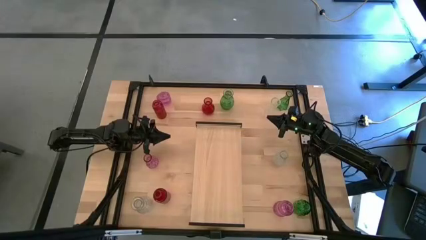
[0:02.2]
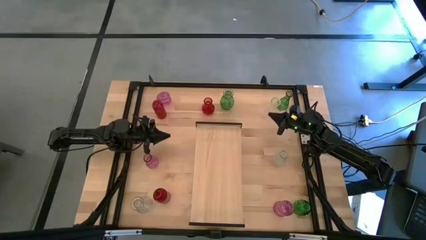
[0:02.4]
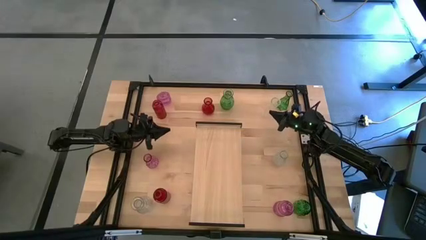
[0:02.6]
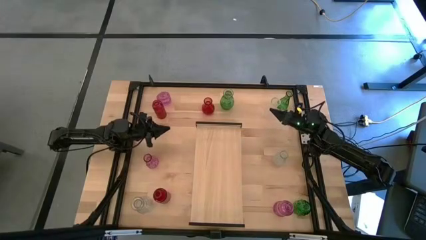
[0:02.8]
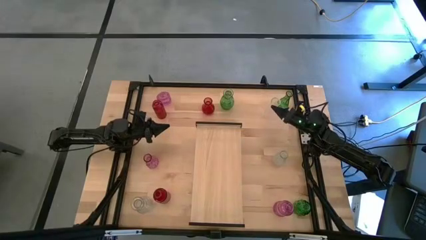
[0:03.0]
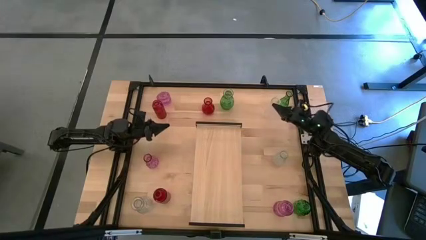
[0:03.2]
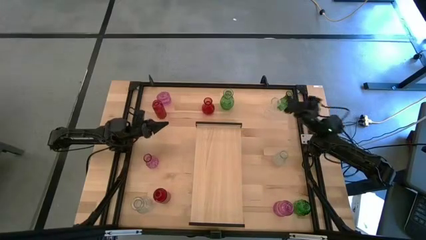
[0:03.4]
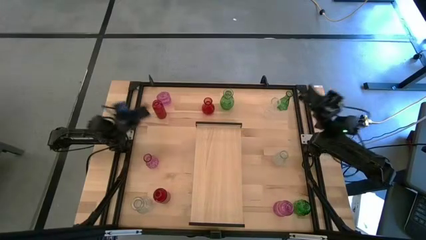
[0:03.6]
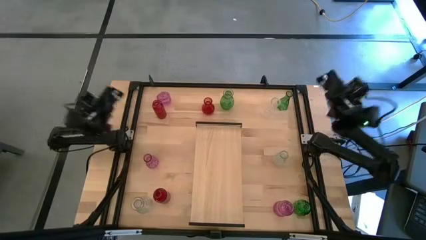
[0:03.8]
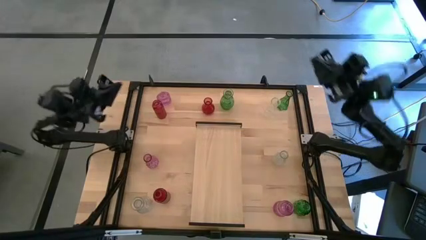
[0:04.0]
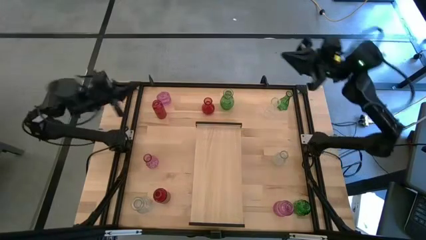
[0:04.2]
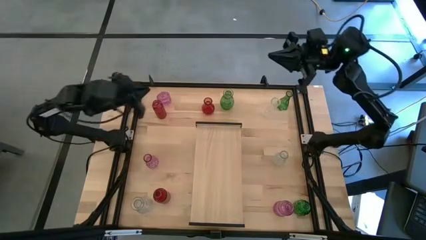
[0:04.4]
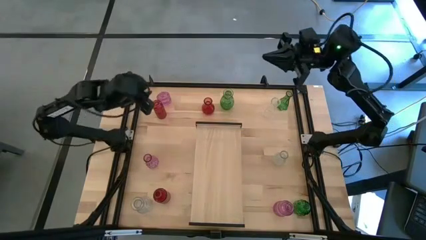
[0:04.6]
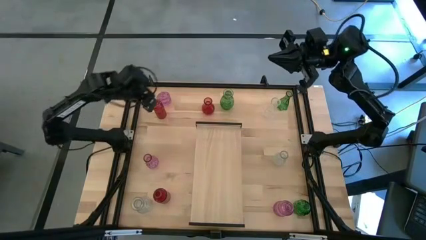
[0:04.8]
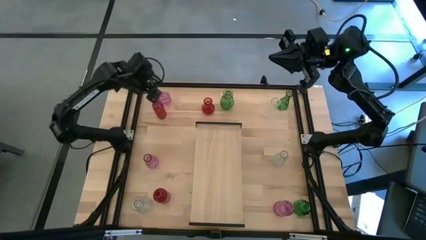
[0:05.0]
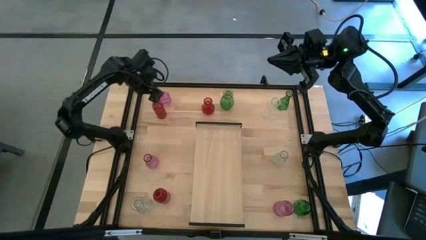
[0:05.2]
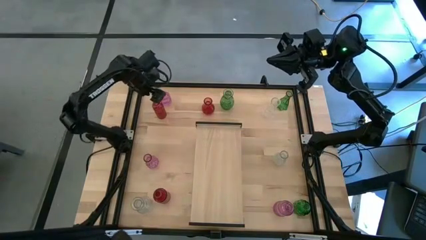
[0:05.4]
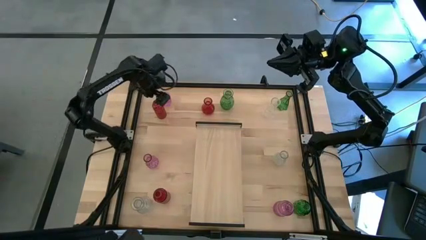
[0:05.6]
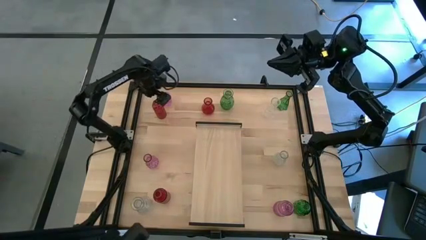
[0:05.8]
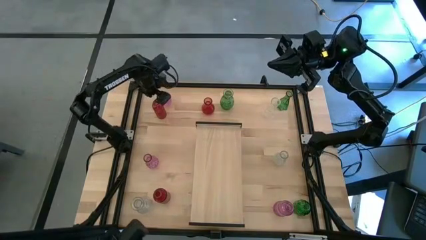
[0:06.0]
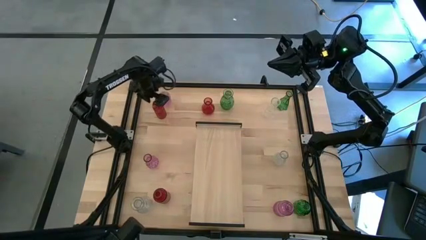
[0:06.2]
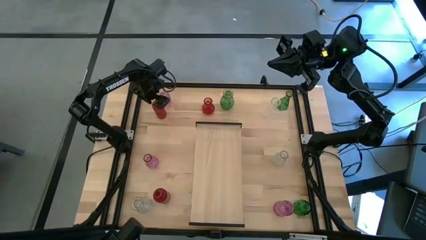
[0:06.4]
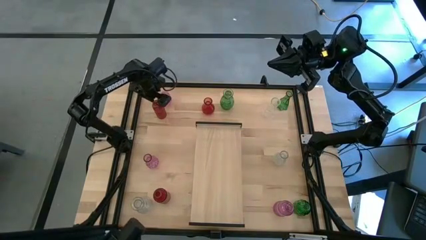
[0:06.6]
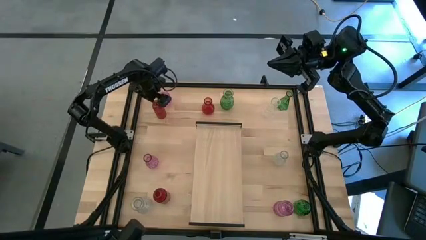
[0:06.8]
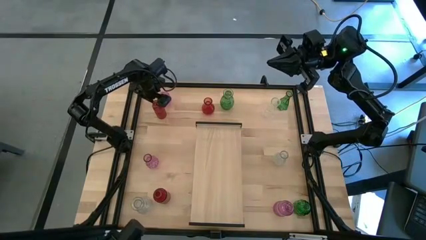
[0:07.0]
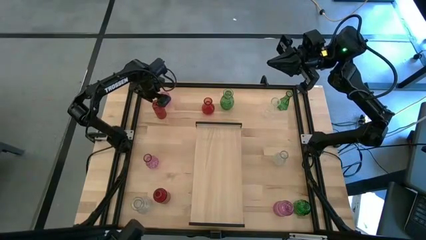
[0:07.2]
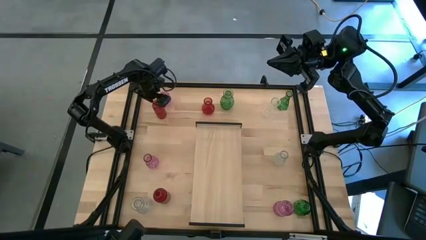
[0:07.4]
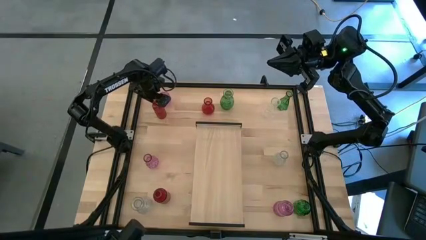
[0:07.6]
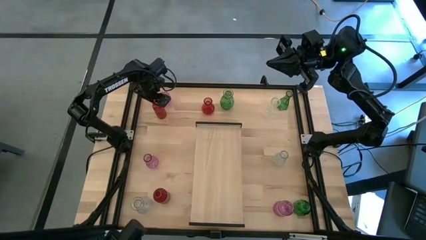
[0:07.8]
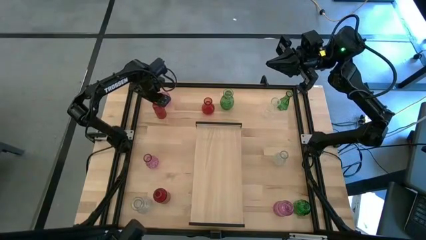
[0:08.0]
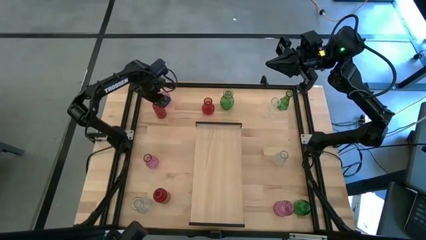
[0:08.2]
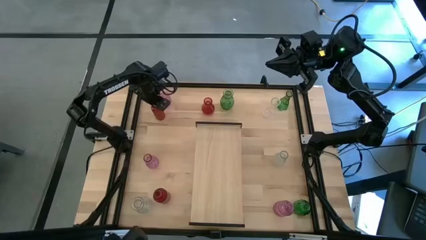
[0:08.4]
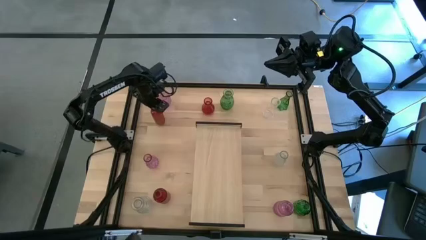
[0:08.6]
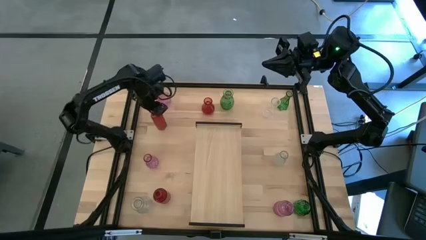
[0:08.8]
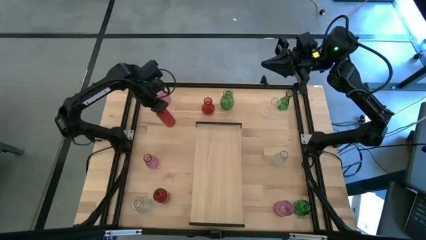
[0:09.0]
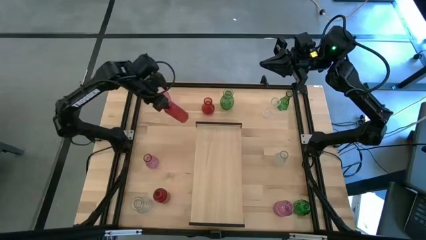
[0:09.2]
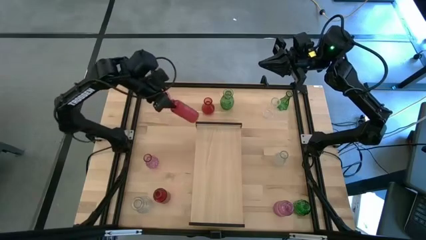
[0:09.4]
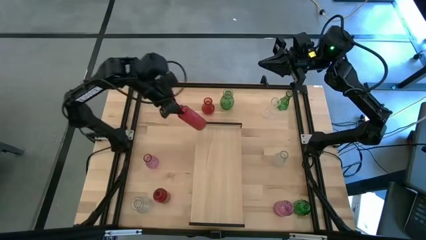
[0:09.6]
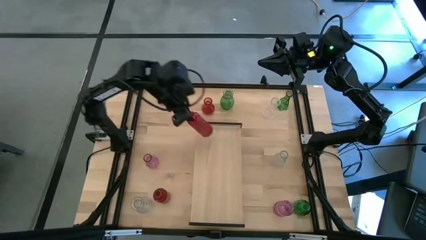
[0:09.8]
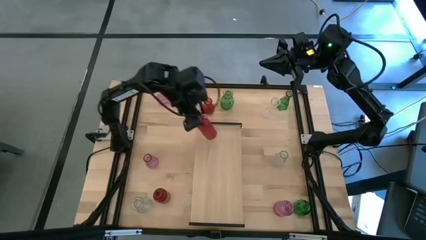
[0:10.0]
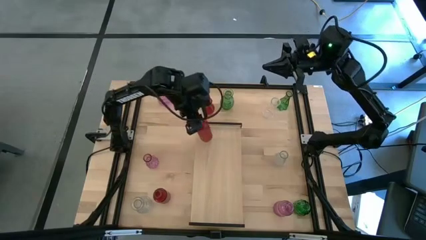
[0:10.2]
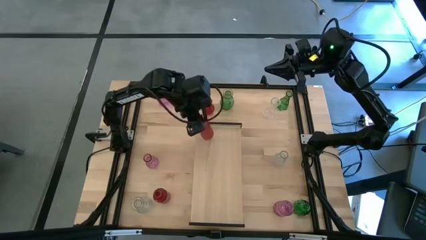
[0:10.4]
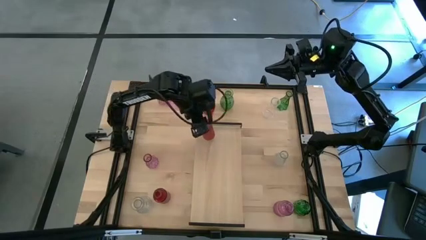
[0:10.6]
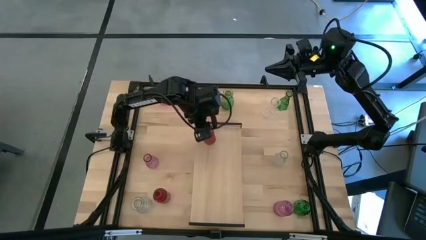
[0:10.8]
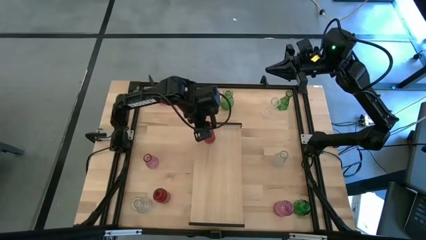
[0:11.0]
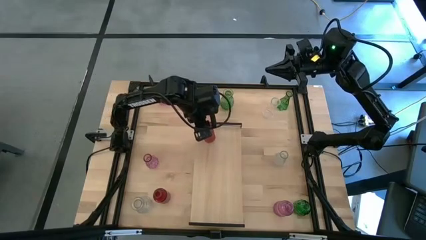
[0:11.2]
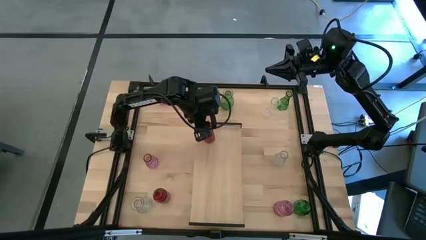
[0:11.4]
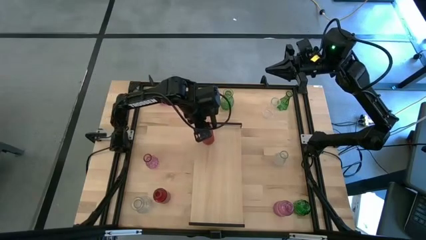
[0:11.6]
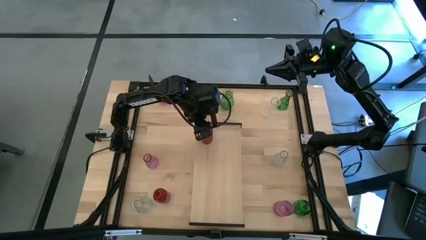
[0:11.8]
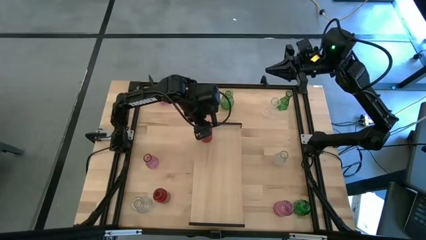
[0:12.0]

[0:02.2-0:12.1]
Task: sort vases onto shelf
Put the top left red vase on the shelf

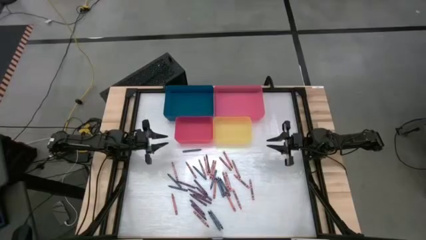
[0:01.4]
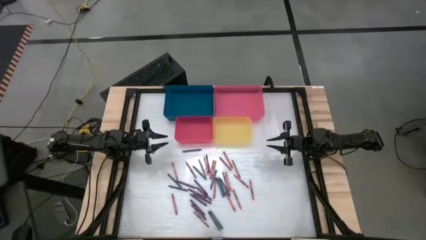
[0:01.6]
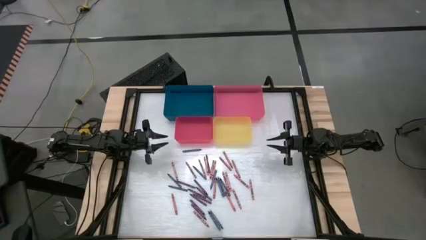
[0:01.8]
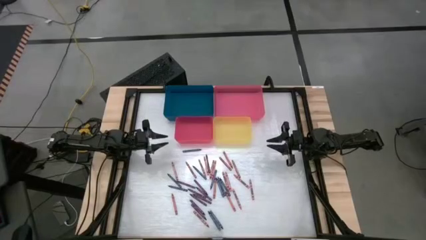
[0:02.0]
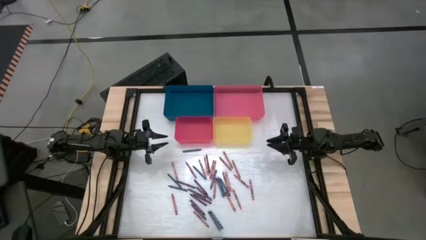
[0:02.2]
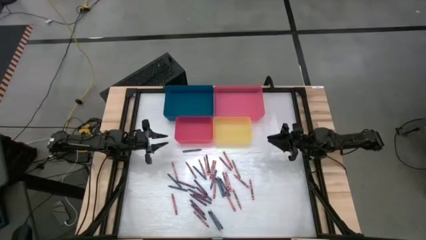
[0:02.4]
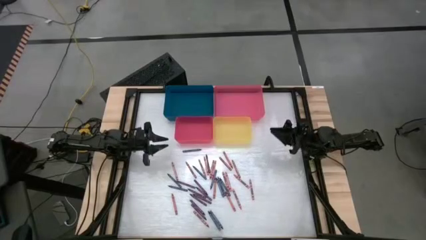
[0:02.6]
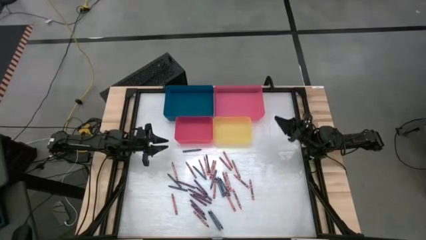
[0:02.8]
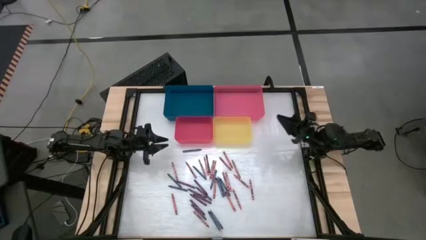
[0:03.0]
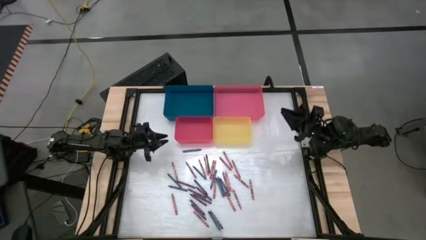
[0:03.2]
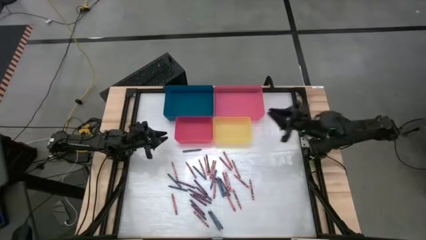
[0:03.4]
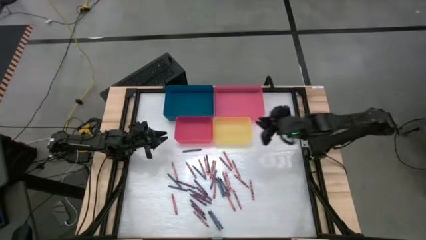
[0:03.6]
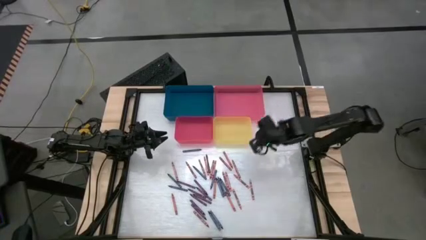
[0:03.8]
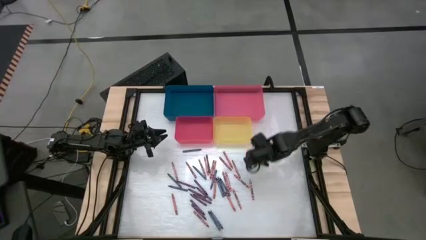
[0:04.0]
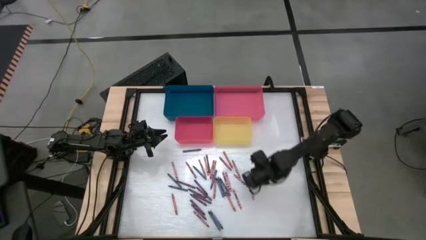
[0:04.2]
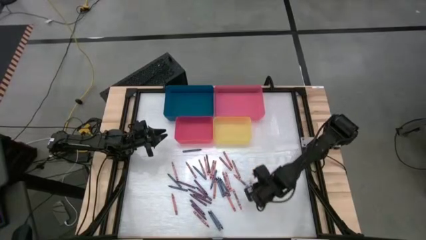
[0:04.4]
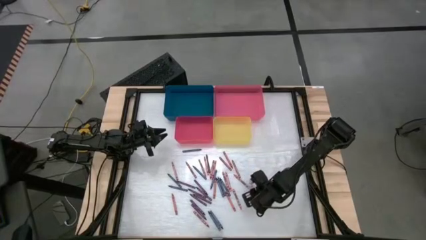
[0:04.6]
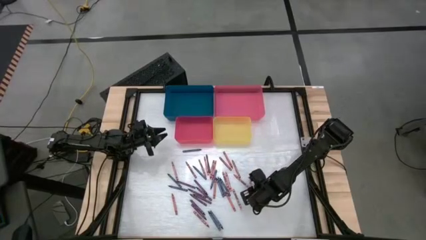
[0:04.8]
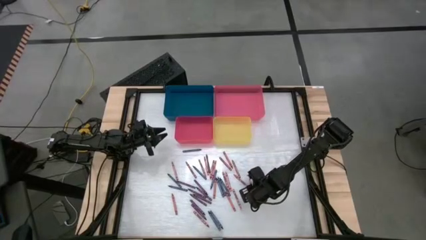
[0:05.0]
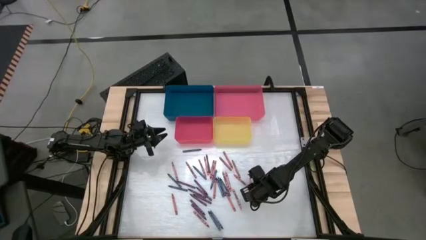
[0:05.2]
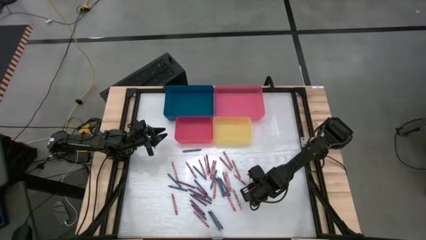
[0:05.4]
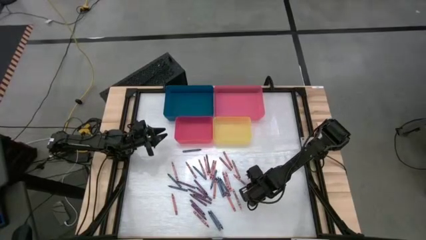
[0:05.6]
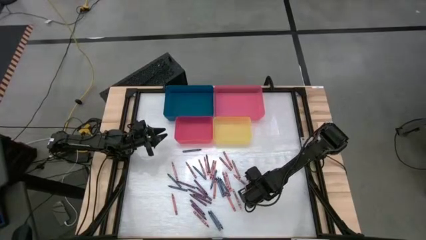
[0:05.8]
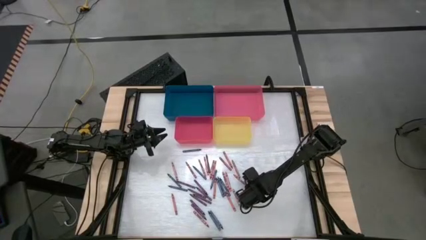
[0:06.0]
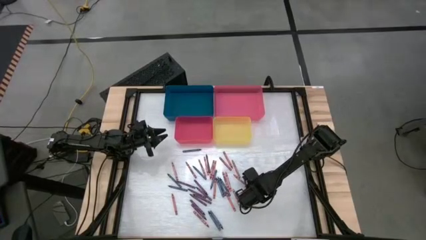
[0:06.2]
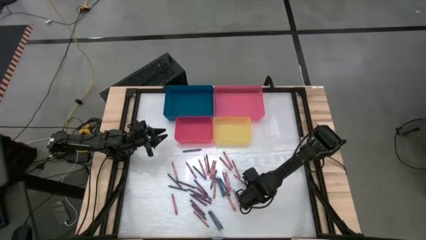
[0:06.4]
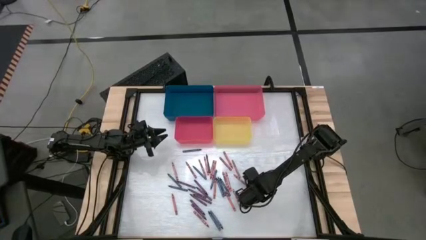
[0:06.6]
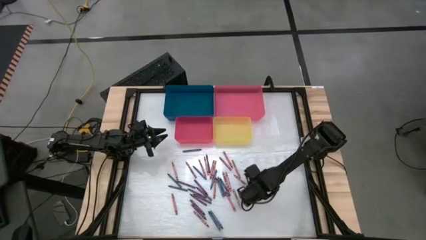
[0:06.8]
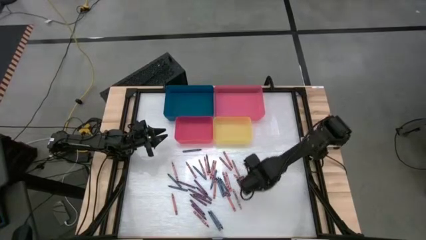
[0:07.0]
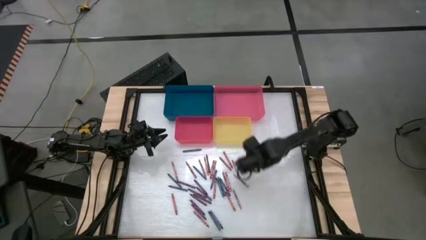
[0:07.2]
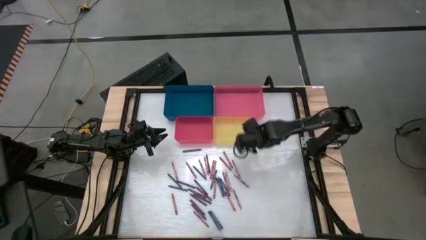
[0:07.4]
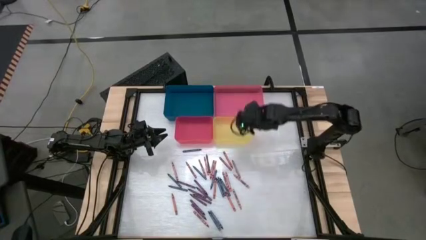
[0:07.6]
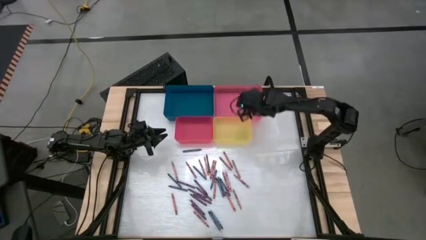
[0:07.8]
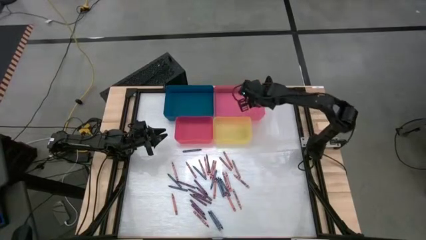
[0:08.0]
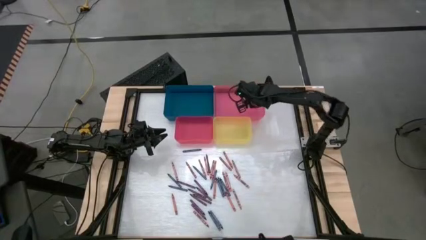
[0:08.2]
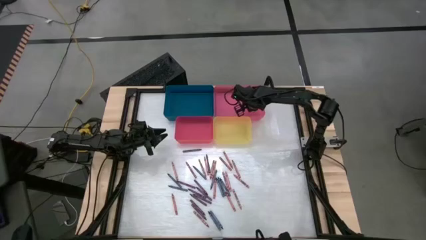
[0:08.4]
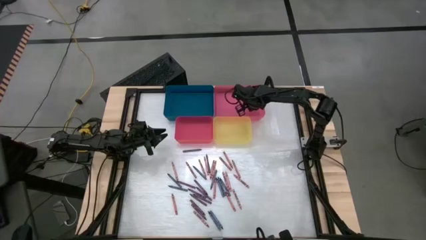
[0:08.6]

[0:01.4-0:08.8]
Task: Sort crayons
Put the pink crayon into the pink bin
